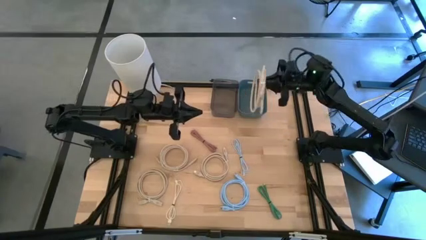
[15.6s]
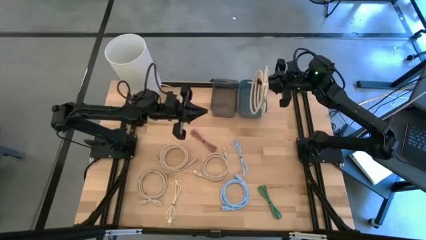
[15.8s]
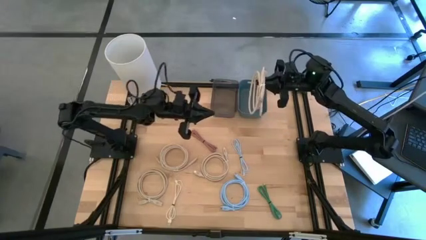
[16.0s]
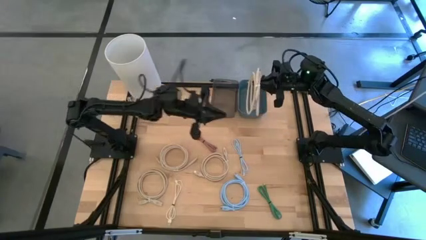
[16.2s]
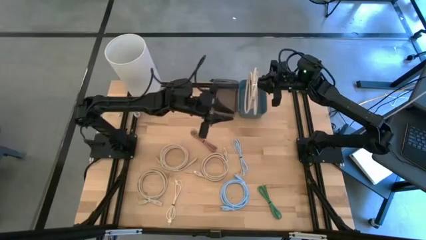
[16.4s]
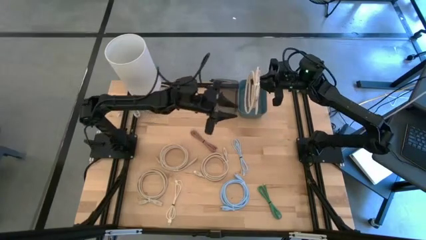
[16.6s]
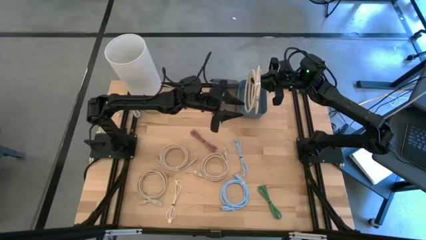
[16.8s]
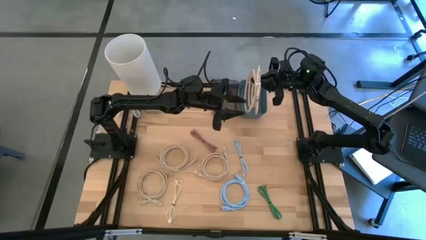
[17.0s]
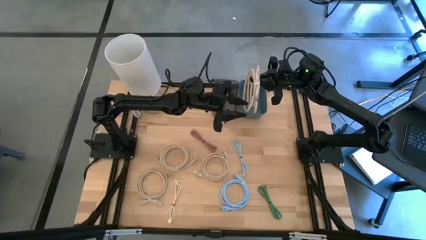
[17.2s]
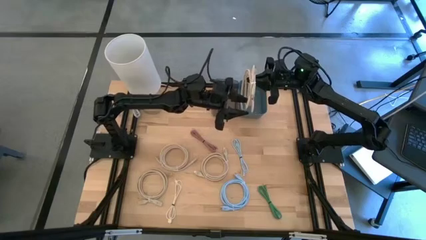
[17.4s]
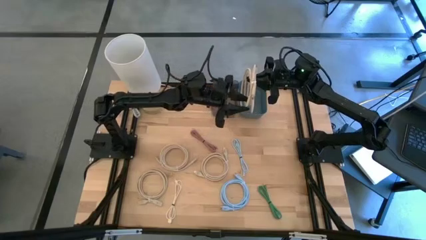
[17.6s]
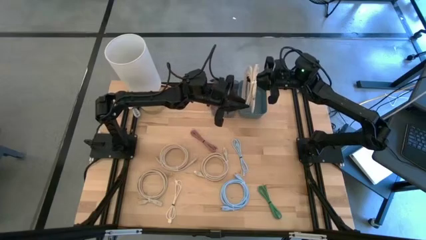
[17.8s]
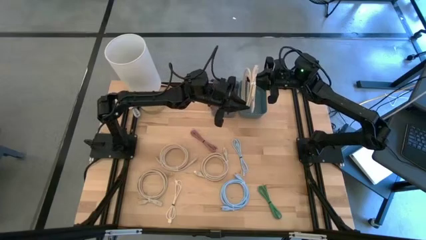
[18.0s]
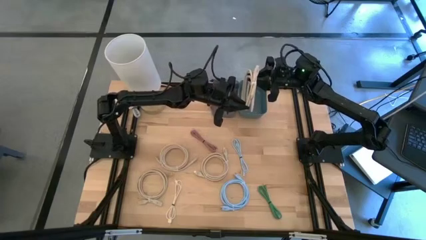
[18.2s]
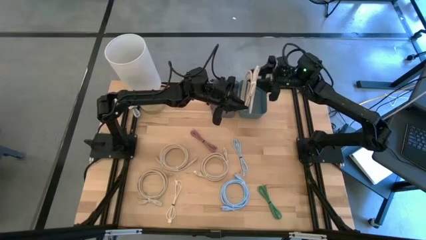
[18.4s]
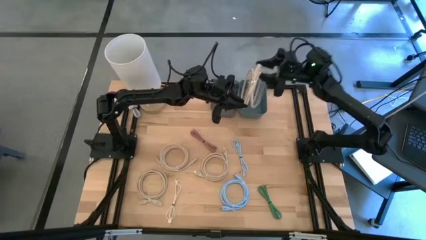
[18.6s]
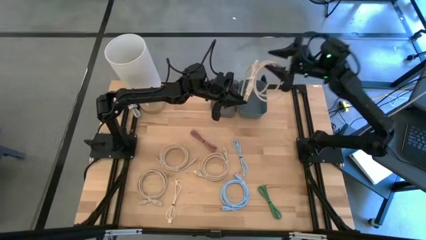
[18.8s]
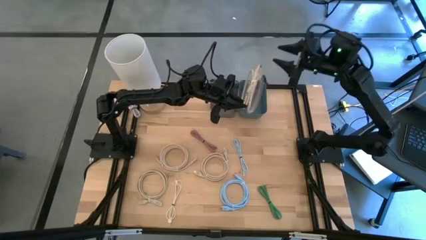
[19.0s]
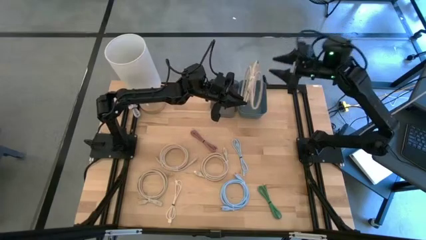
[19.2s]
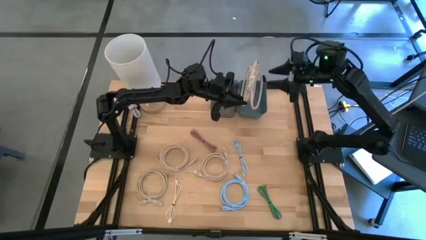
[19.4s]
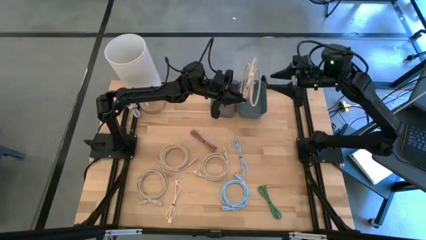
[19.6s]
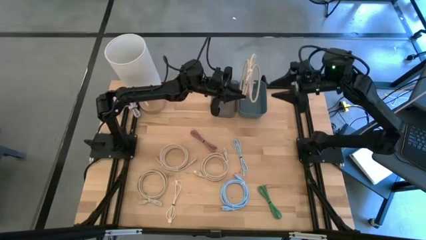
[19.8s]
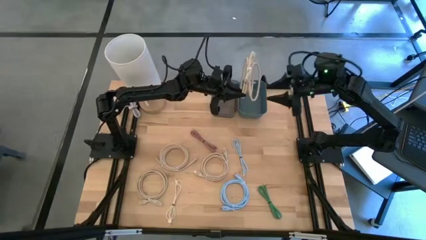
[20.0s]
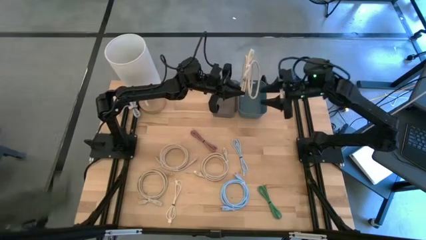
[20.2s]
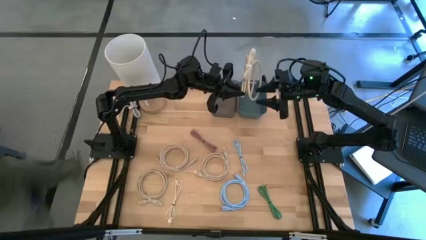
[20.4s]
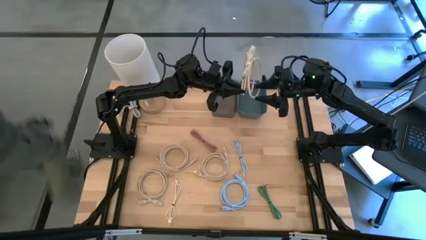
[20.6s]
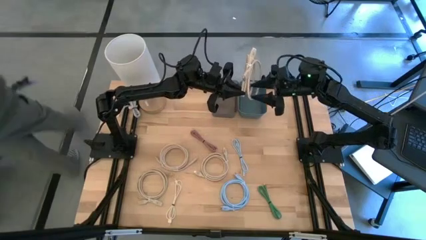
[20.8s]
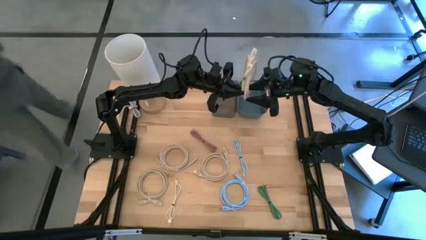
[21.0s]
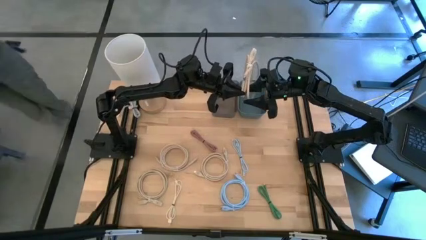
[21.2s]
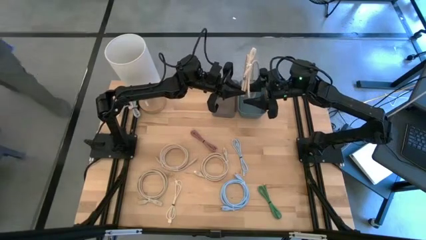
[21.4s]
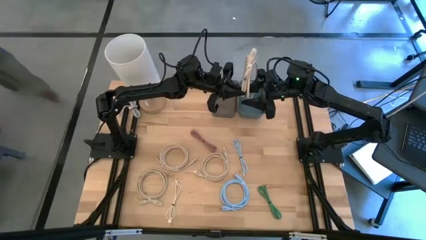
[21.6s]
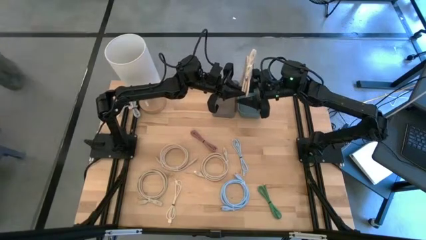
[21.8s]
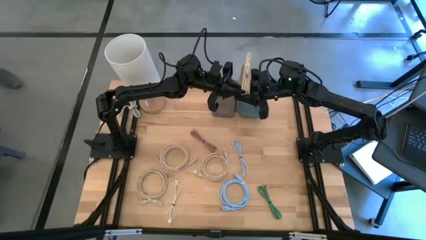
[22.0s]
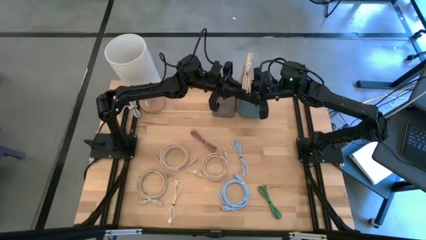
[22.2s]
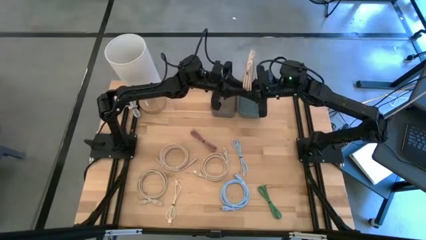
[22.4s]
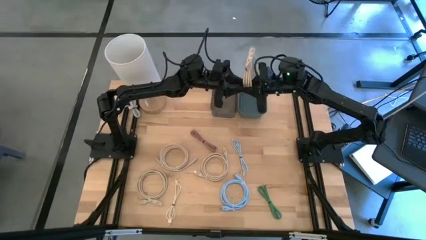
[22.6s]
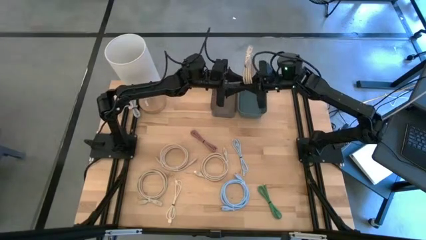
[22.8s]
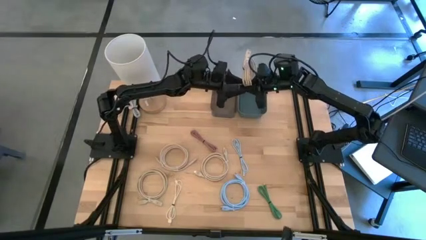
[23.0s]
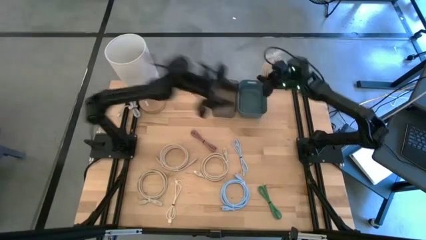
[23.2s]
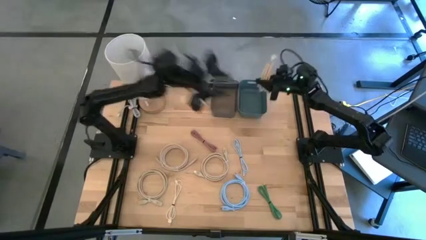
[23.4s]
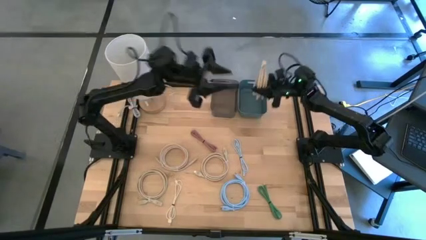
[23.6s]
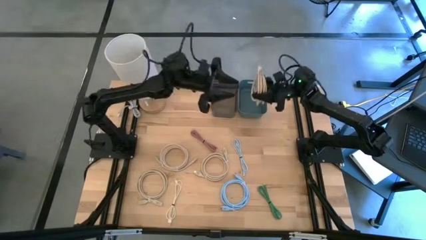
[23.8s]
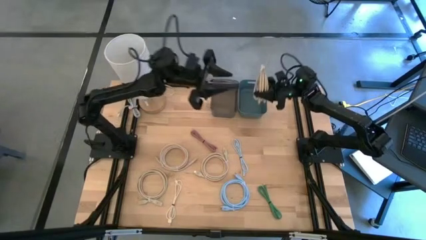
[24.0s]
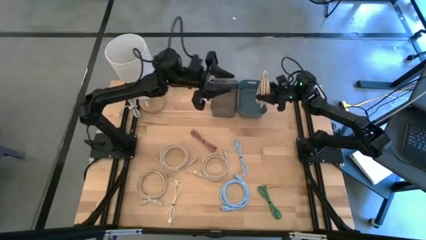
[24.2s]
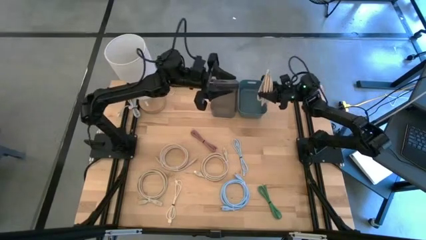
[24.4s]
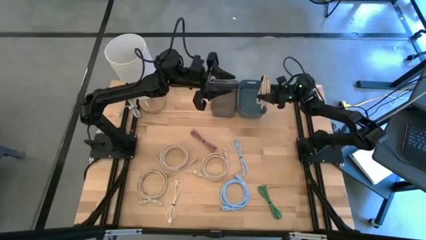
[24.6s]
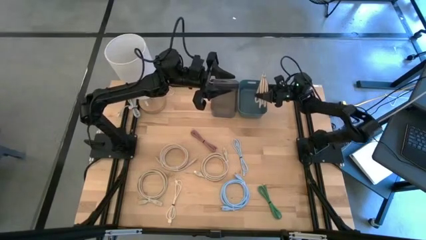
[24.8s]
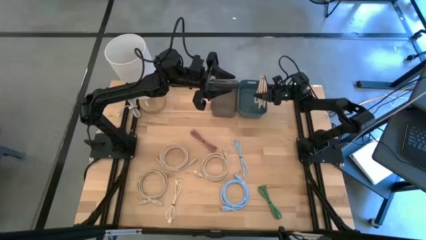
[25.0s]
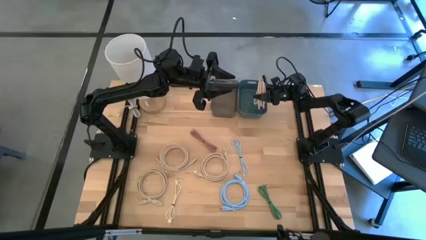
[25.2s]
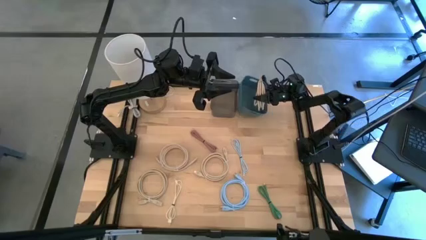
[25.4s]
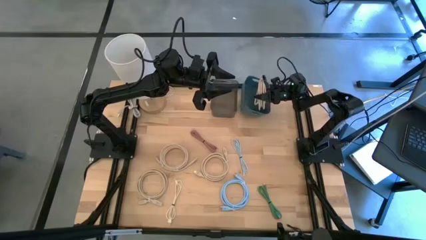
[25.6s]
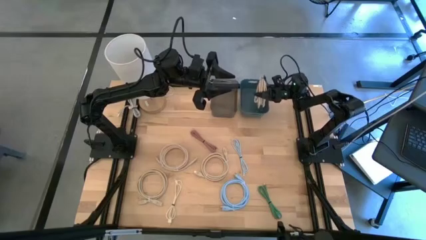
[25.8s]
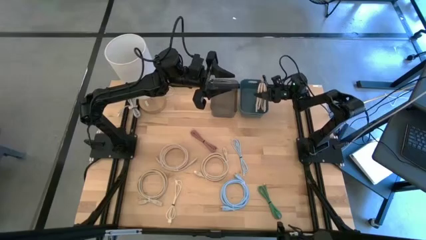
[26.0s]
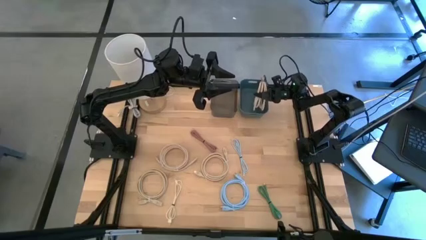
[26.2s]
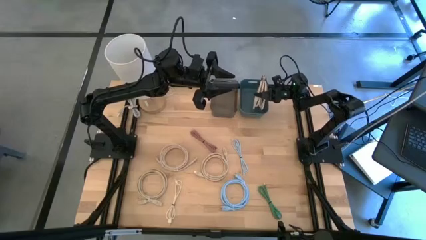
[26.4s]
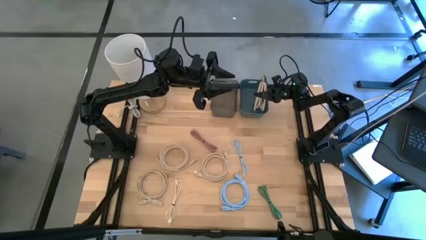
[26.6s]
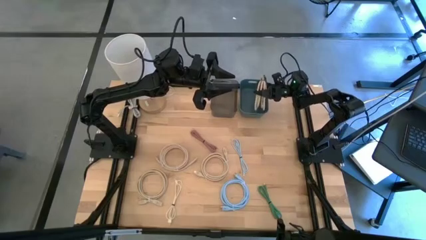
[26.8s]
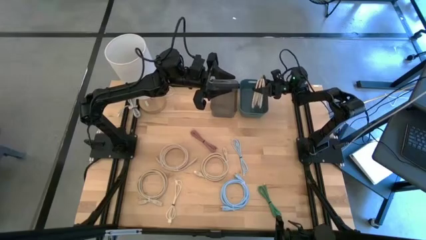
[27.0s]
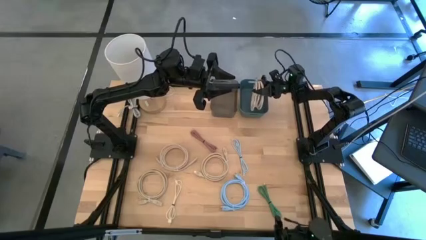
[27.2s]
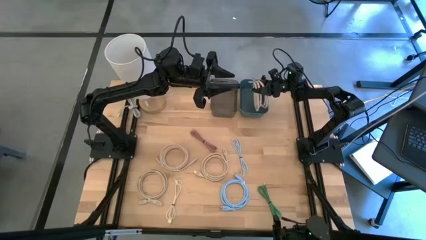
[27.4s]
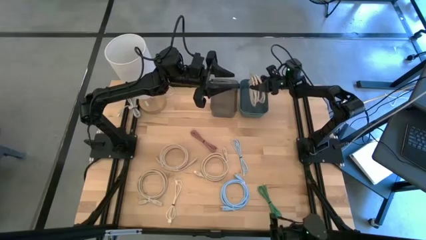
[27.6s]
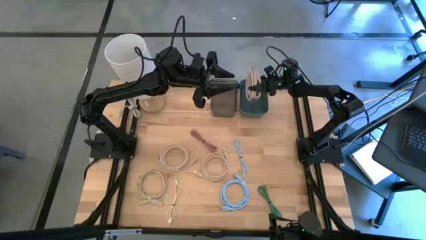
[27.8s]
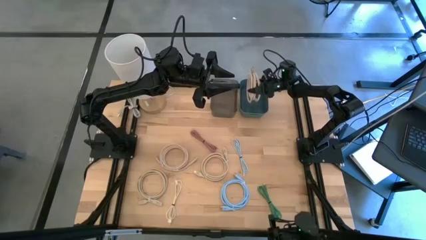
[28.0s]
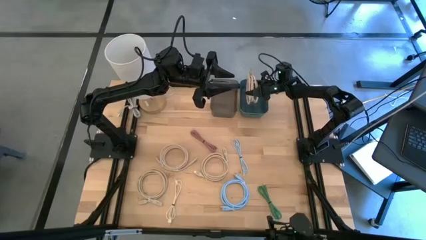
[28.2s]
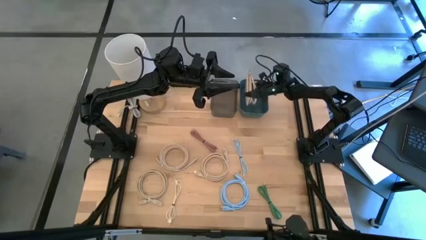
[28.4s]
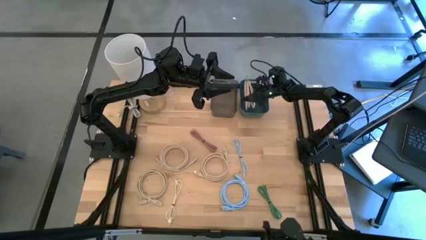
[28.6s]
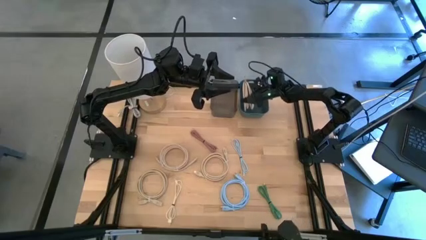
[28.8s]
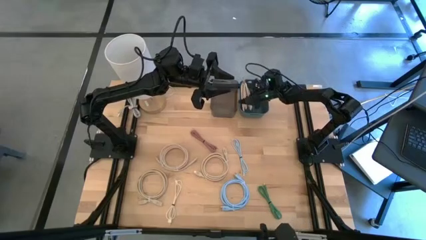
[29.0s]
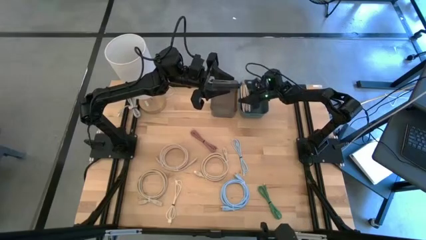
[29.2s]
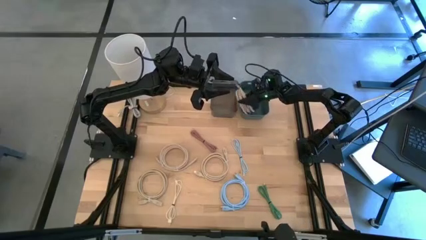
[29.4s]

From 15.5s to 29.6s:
Put the light brown HDMI cable into the blue bin
